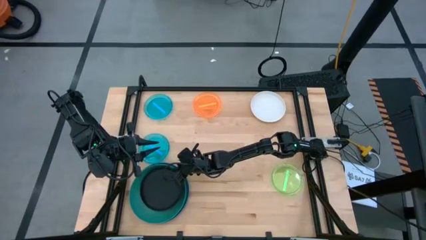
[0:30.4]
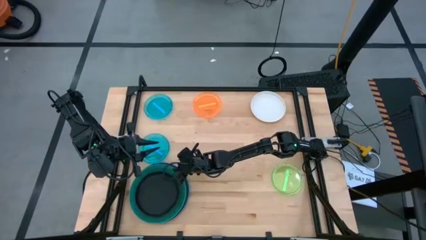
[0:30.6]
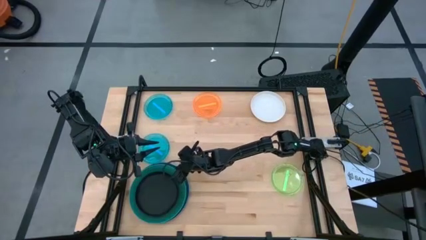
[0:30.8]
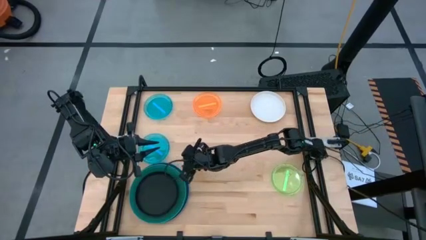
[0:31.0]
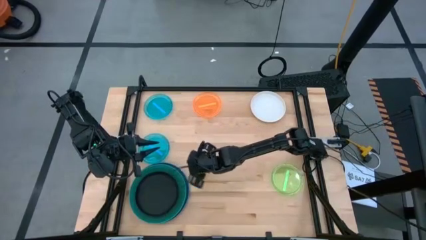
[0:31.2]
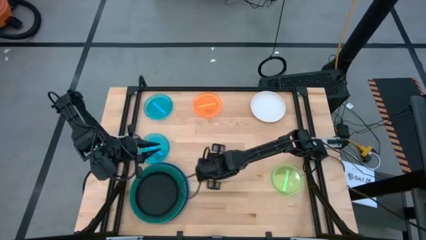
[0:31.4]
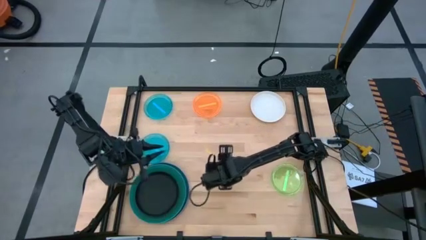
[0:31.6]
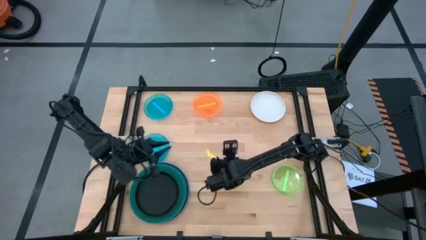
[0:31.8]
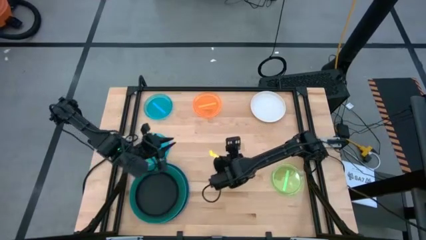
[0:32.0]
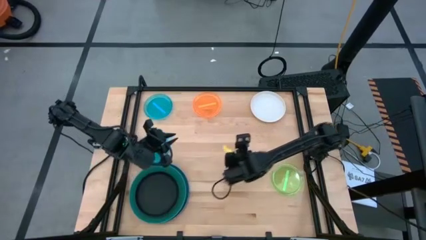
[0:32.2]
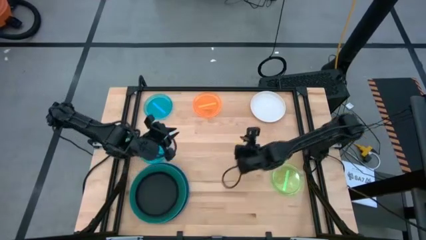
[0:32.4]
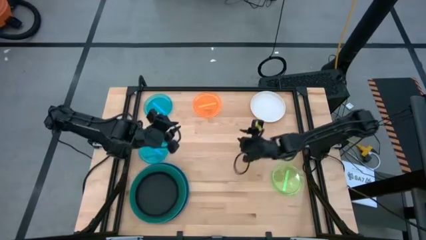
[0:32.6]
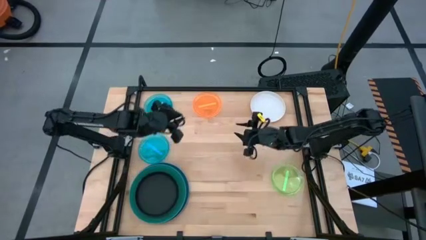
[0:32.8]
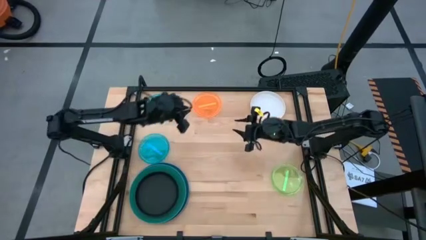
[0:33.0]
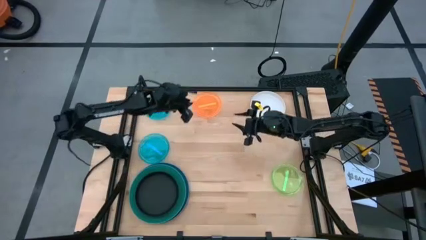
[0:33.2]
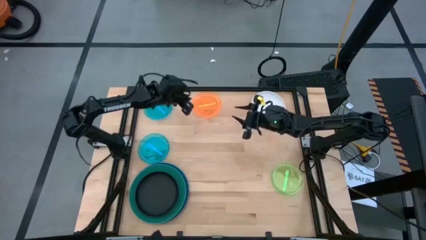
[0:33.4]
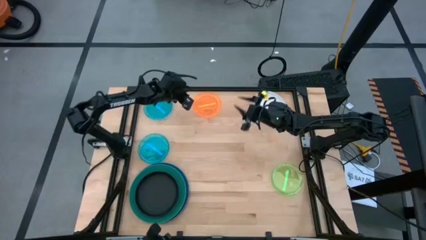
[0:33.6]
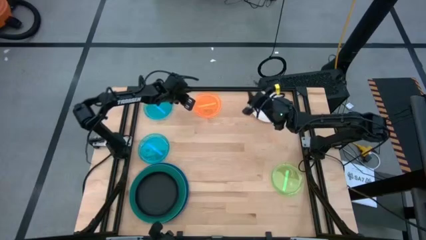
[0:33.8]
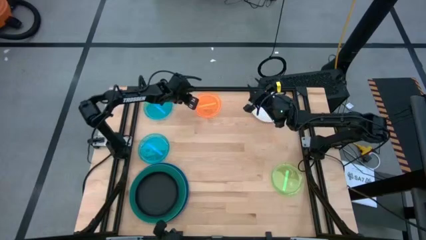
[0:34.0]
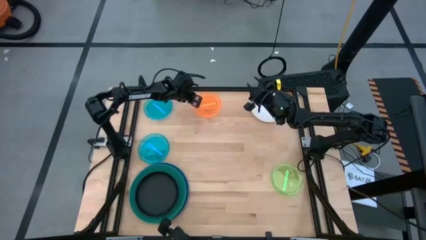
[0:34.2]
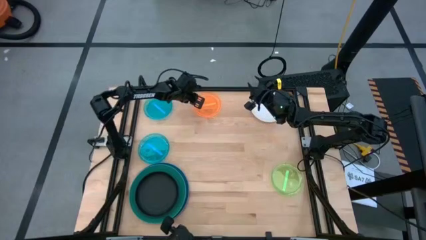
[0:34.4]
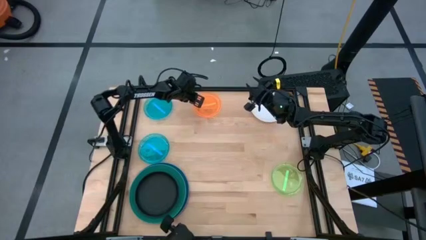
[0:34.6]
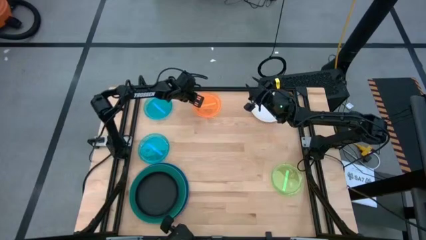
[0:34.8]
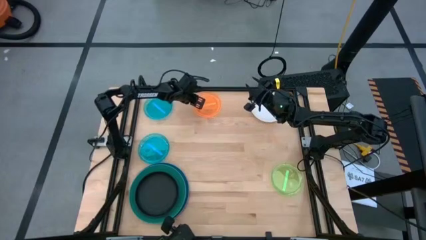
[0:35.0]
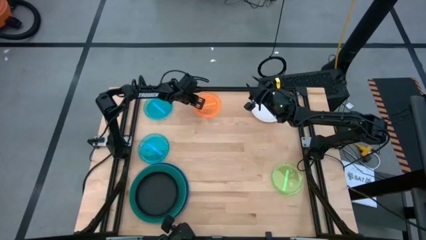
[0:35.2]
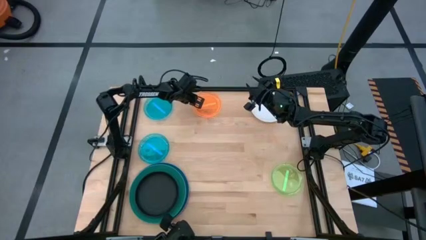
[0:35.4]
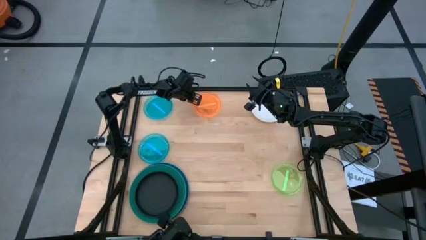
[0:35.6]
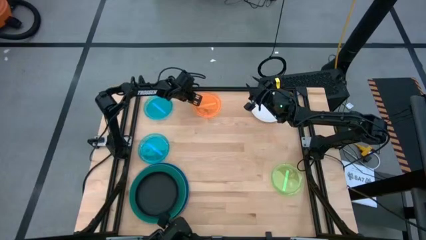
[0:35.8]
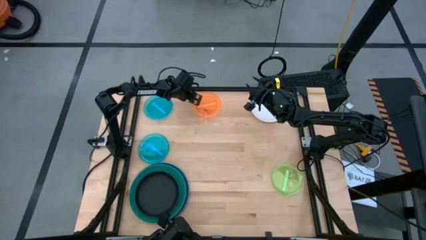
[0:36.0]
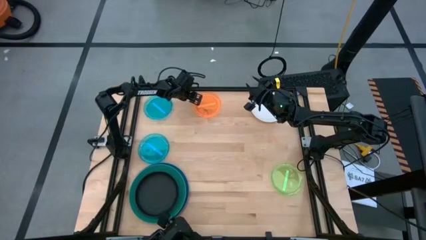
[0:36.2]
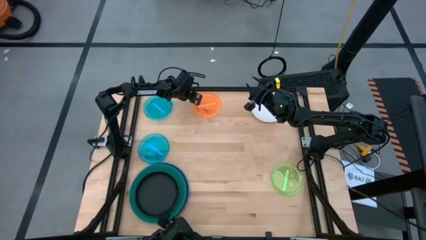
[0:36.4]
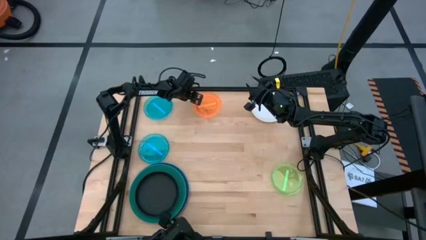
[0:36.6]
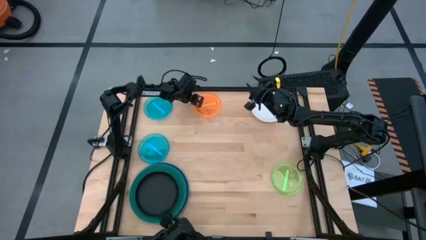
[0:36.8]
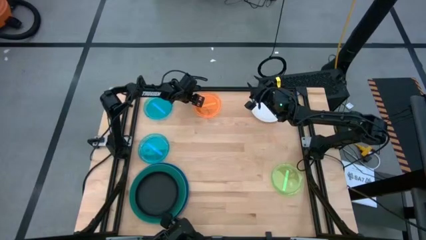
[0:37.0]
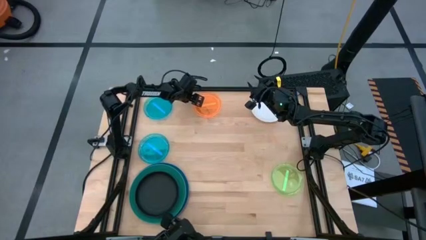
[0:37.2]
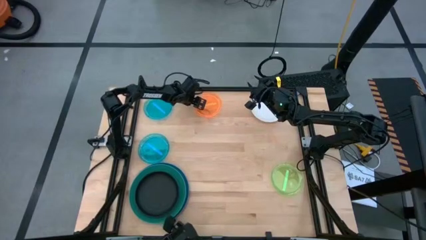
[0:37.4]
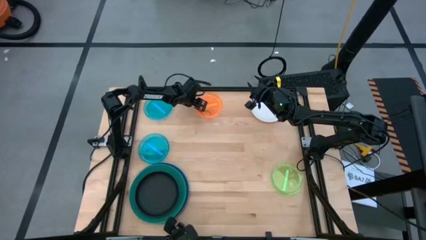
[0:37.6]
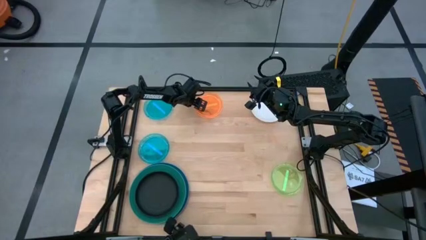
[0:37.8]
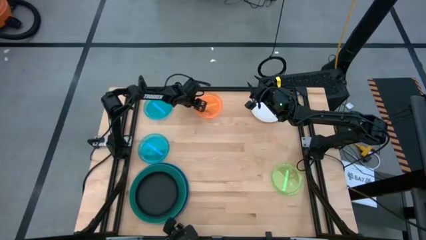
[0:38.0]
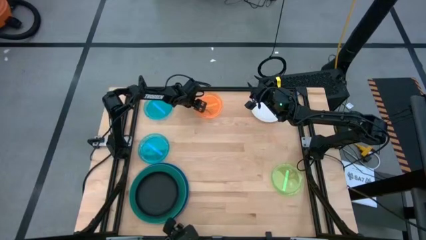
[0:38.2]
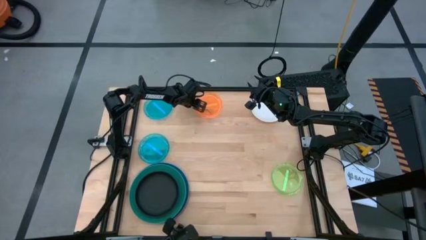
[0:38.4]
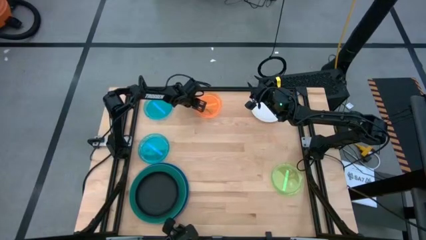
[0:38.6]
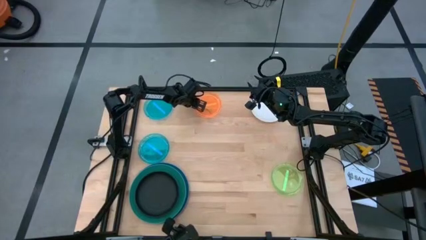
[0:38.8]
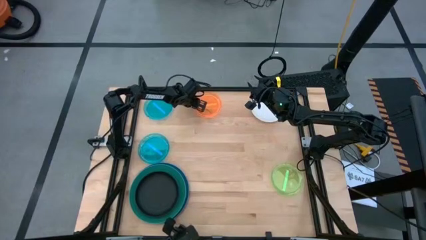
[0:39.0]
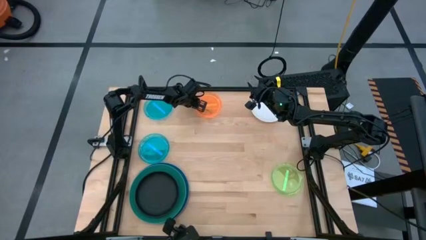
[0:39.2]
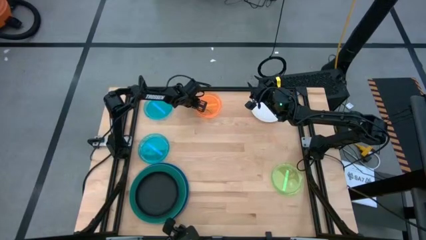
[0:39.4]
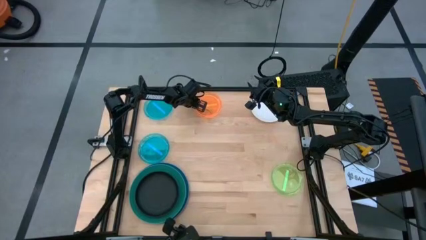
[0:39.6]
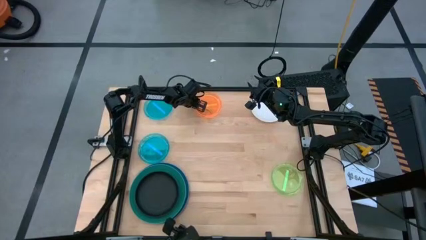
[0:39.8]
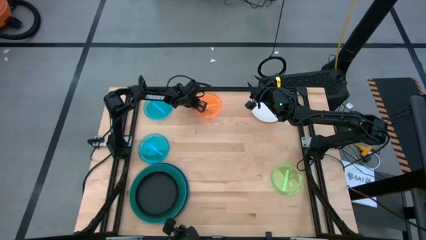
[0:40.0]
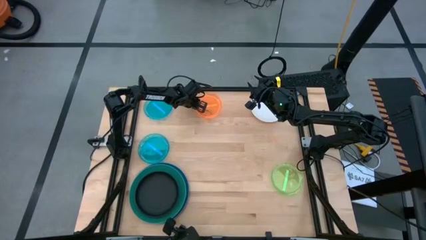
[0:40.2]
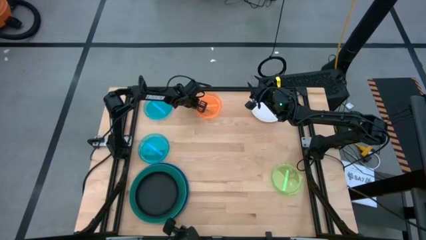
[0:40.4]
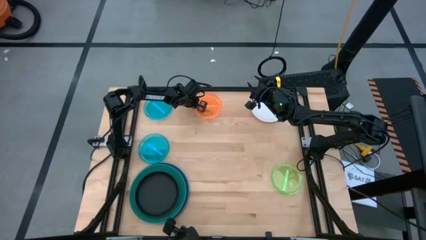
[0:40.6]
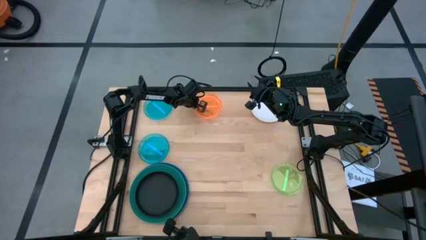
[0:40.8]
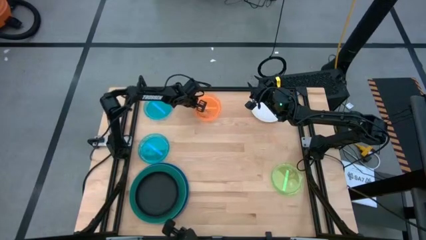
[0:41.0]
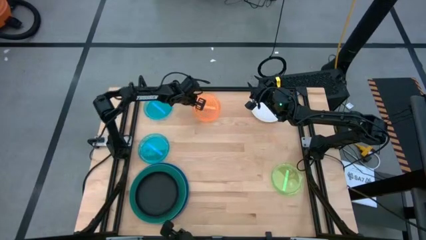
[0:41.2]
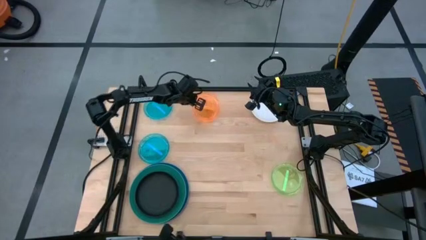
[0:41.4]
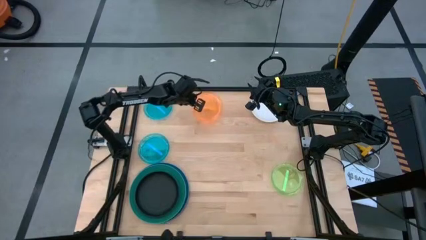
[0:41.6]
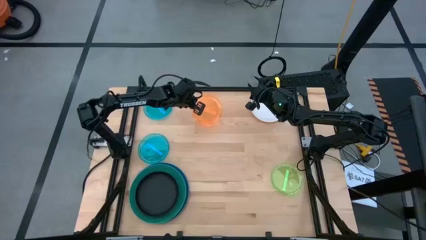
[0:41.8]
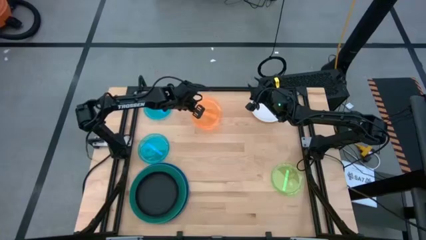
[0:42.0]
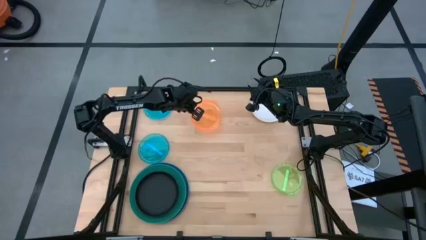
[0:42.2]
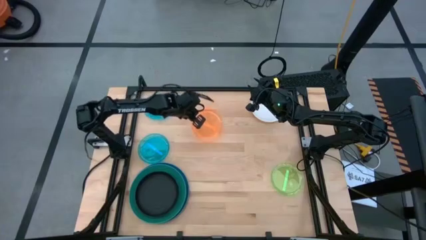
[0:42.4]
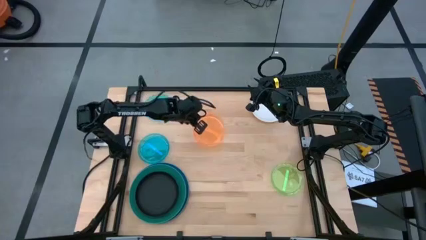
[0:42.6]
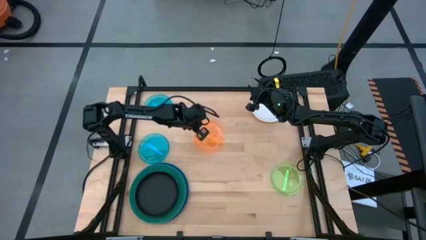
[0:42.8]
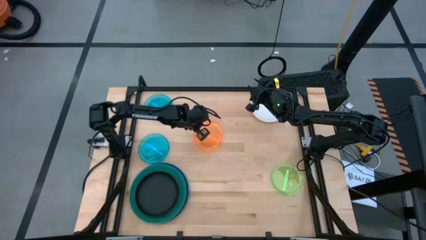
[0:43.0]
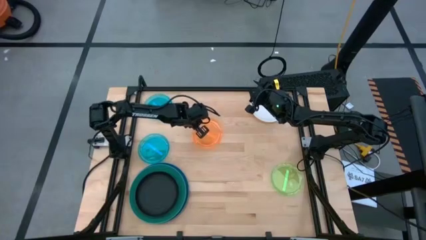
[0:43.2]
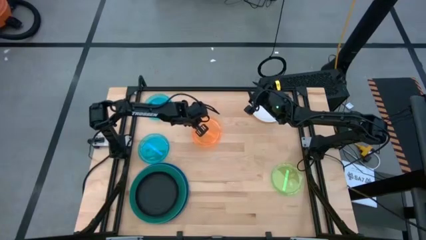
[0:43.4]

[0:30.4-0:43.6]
Task: Stack plastic plates
Move the orange plate

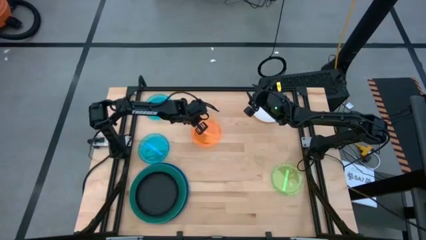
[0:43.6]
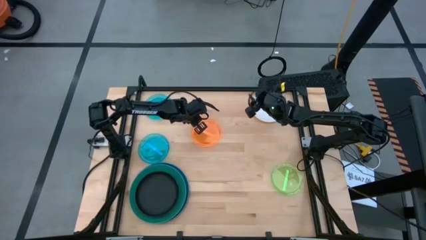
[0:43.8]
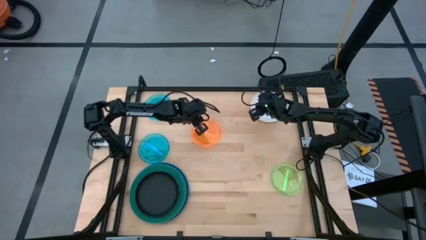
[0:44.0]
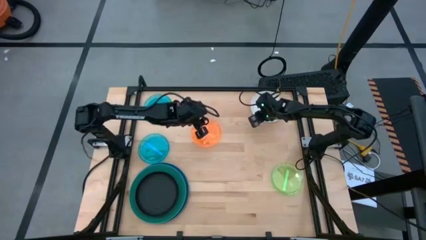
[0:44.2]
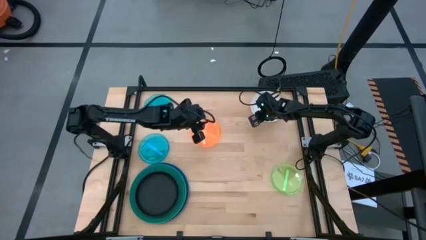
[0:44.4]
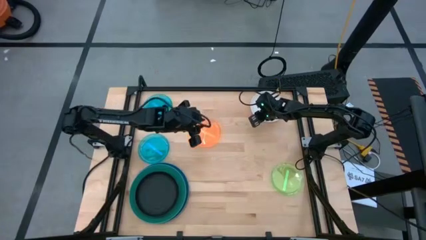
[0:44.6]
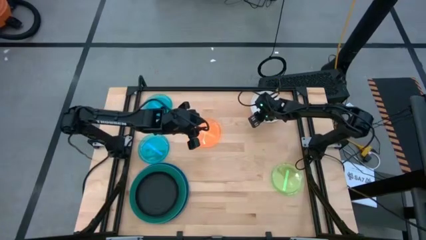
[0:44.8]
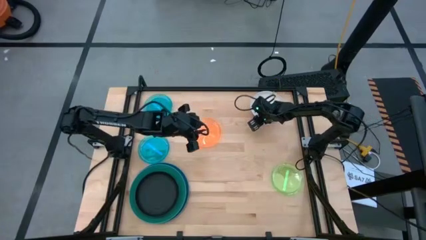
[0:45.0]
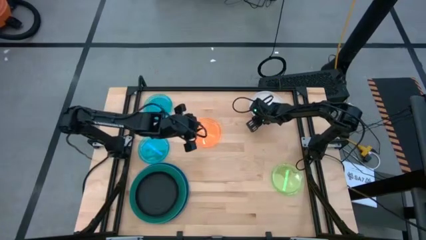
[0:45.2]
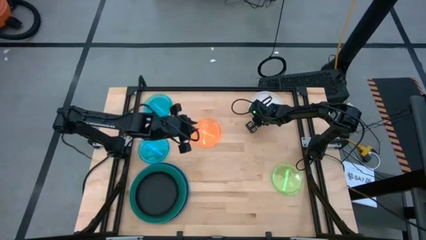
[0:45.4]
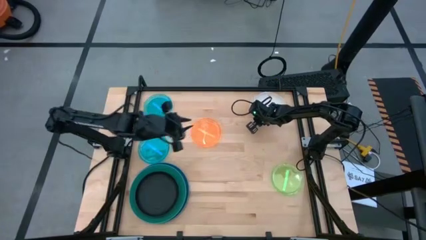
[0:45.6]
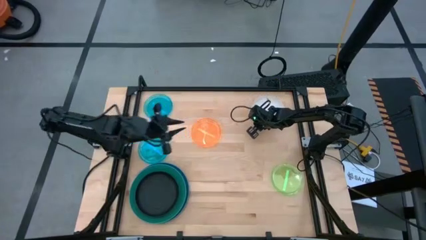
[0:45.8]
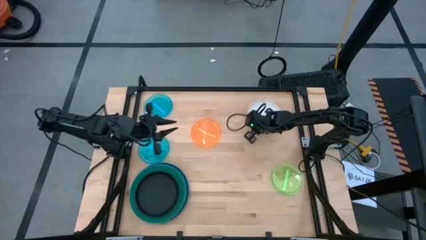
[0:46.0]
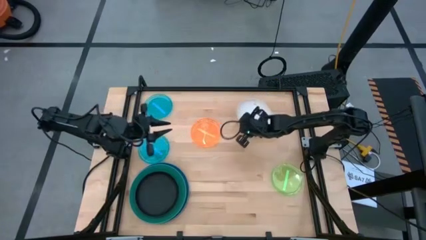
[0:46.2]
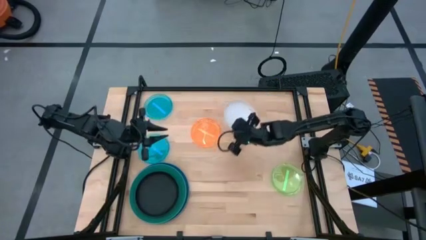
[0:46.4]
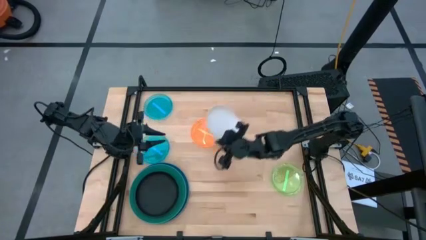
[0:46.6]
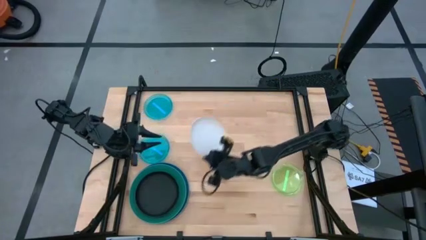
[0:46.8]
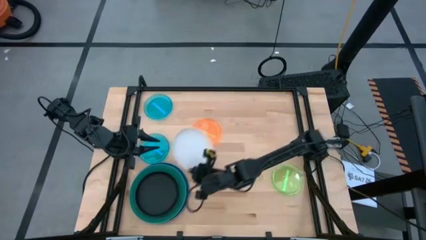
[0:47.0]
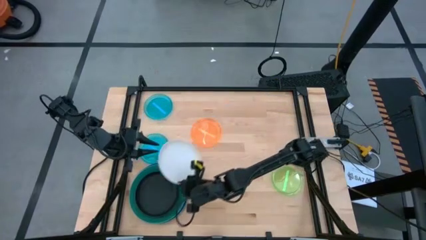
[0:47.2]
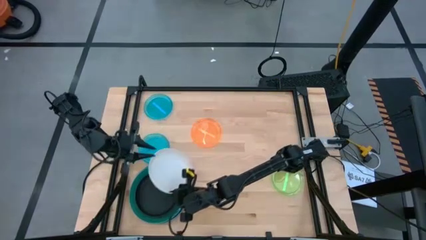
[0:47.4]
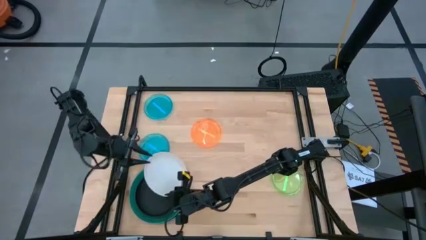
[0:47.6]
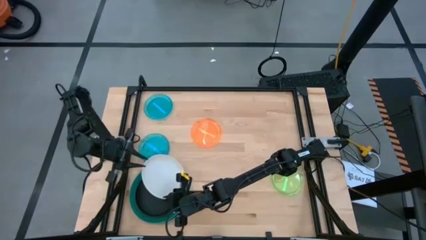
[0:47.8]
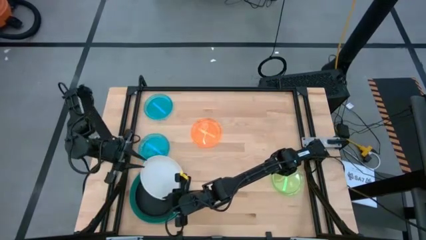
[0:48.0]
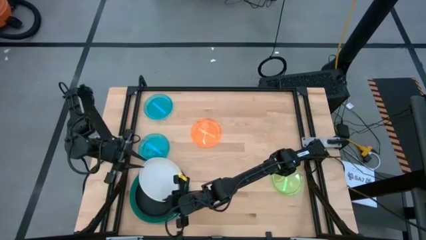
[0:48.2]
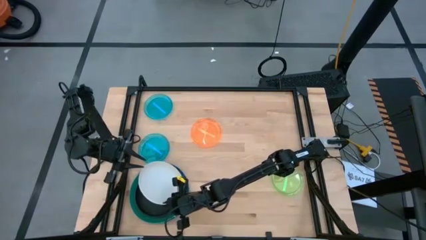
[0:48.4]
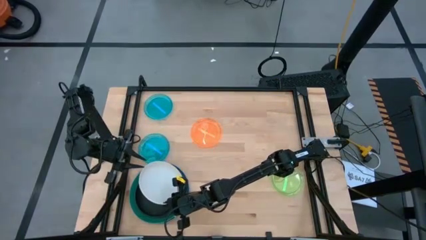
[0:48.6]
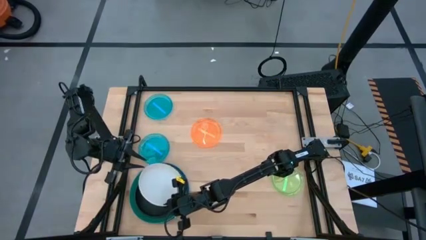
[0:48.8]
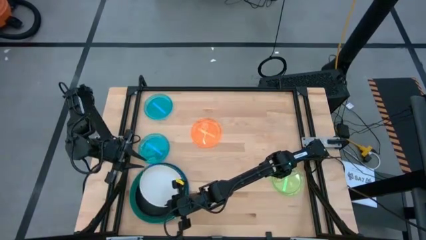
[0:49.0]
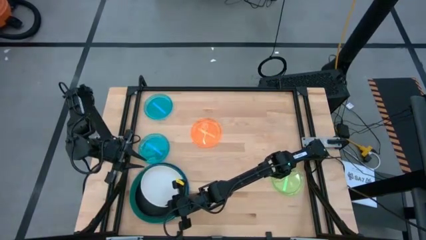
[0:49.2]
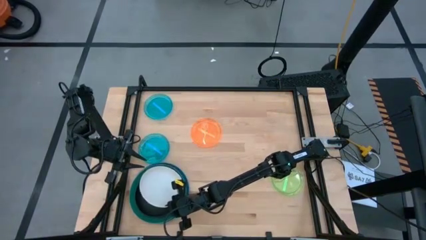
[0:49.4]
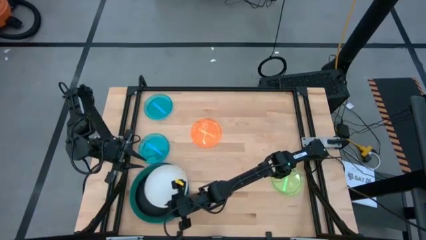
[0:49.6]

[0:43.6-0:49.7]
Stack the white plate on top of the black plate
